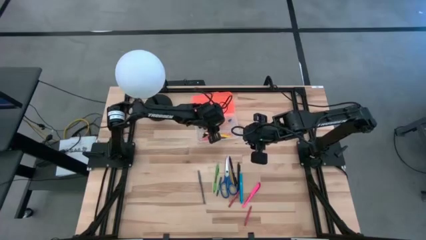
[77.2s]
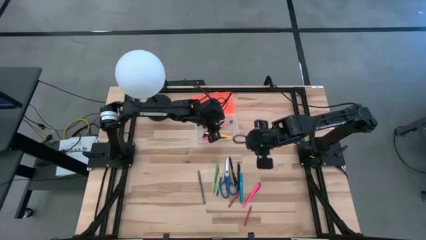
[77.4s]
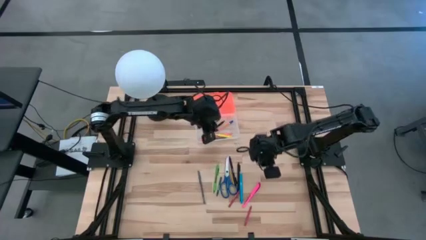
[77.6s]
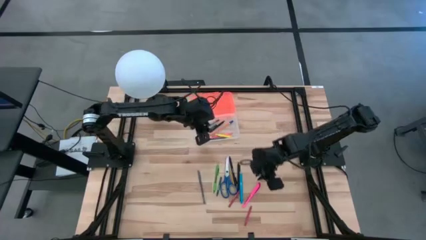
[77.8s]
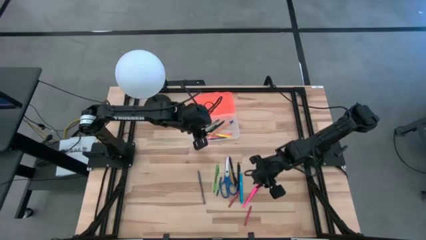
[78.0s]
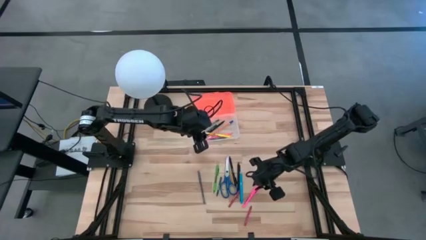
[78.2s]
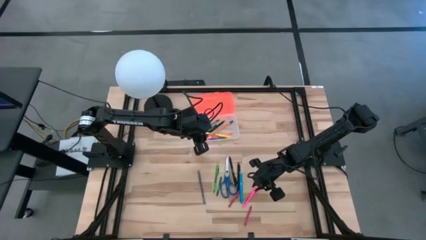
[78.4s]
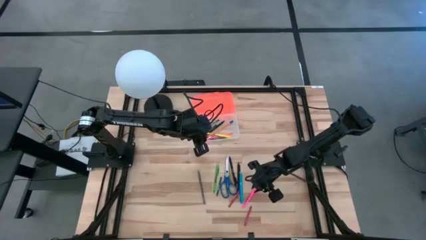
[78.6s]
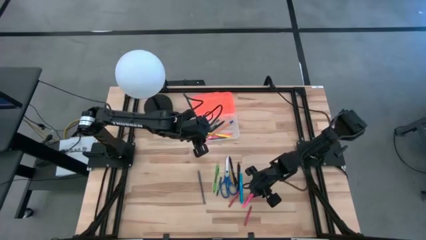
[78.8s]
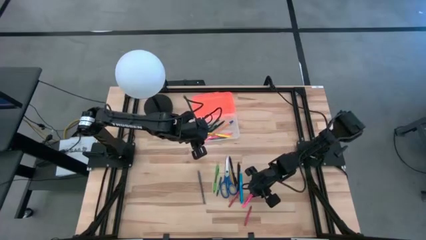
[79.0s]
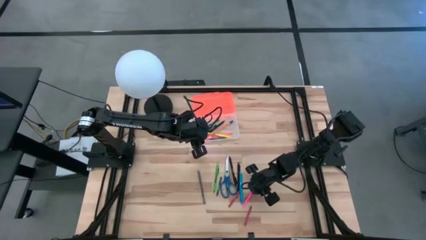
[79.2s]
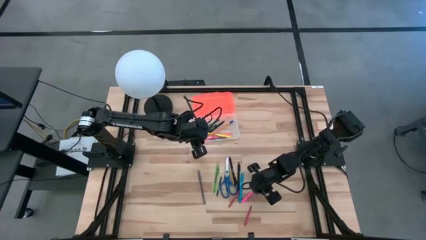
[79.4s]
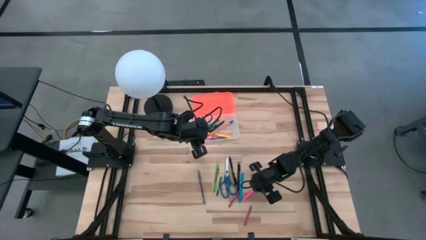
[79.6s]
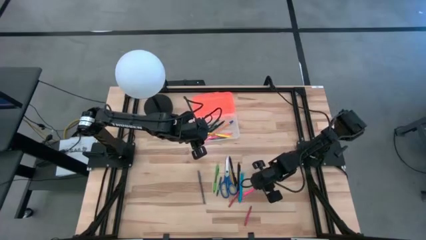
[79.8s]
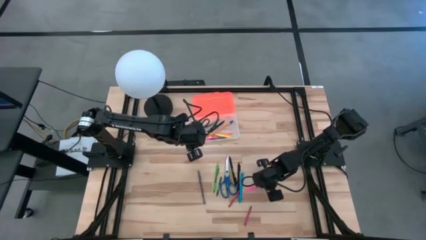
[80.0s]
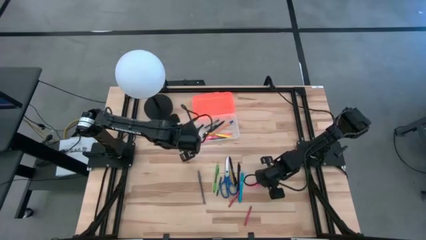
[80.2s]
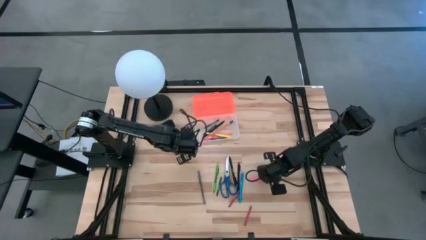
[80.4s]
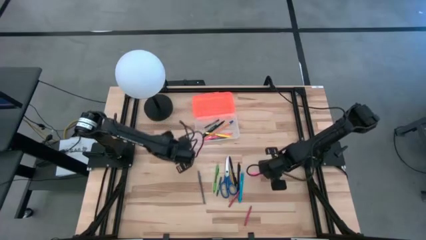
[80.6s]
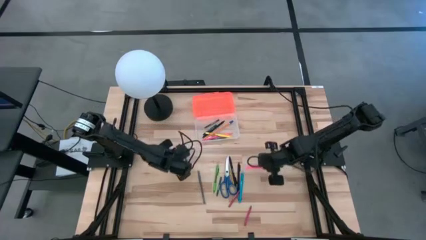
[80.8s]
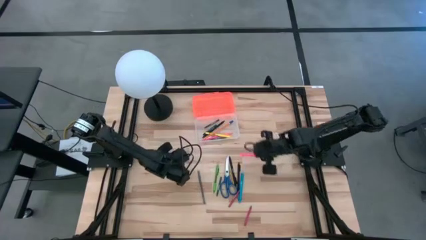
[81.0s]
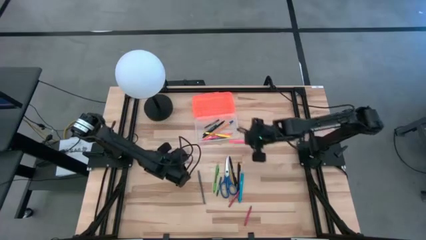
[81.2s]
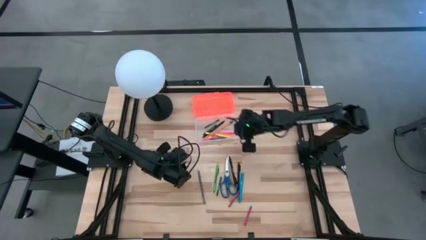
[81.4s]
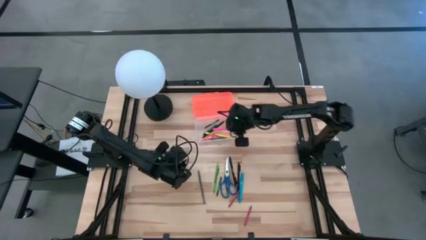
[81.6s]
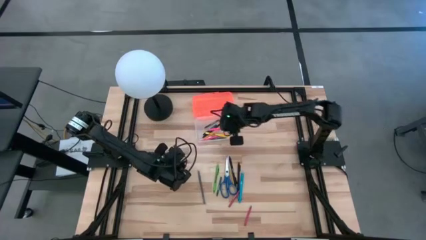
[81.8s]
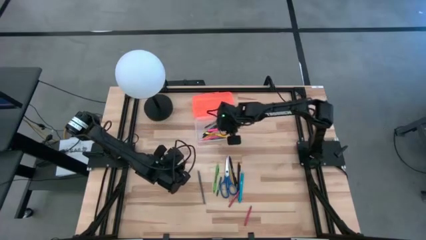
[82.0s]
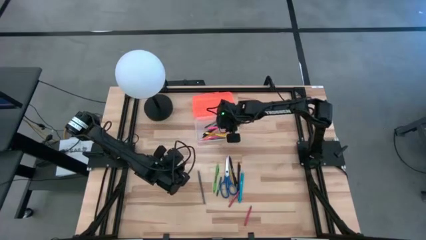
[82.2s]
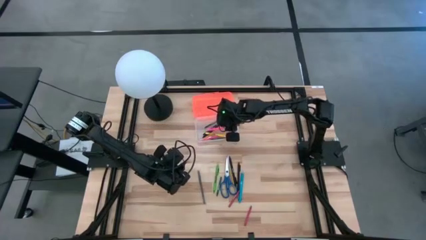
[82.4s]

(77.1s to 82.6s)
Task: Pick & place school supplies into a supply box
Put the pink pen into the supply box

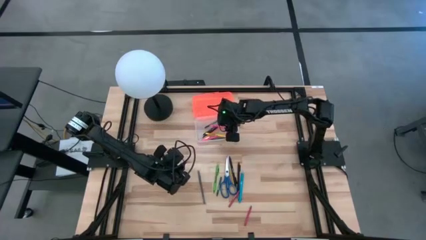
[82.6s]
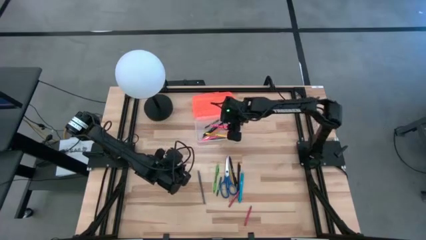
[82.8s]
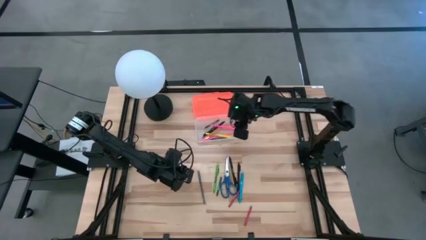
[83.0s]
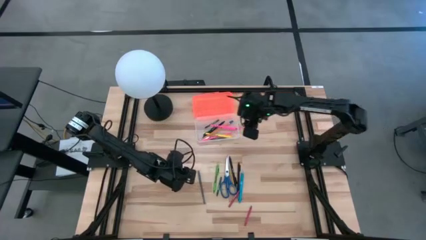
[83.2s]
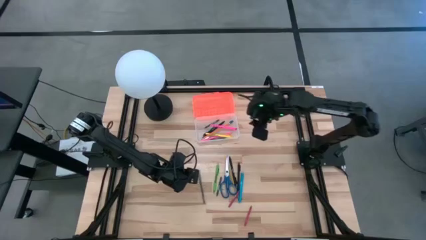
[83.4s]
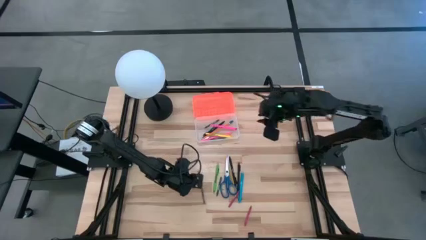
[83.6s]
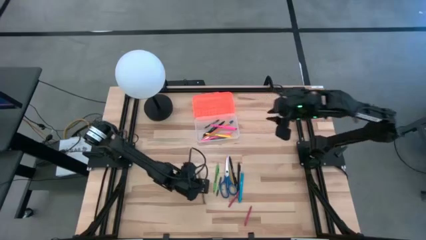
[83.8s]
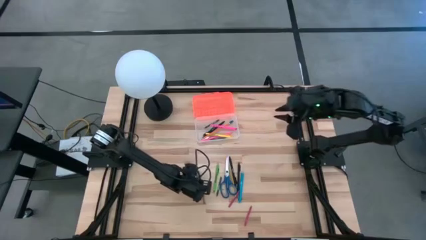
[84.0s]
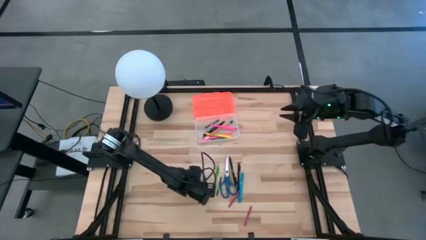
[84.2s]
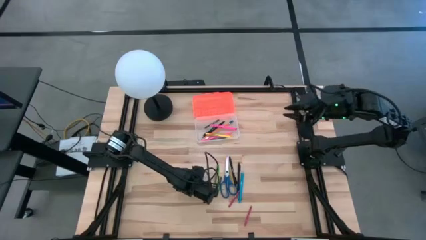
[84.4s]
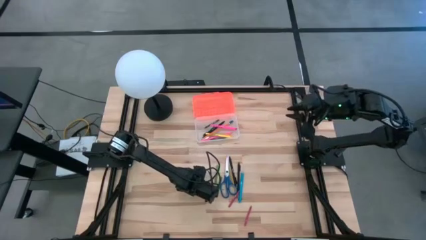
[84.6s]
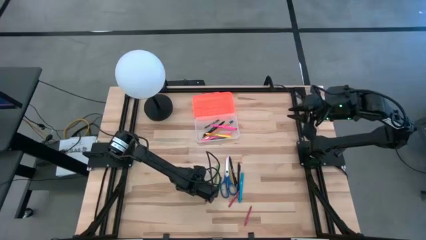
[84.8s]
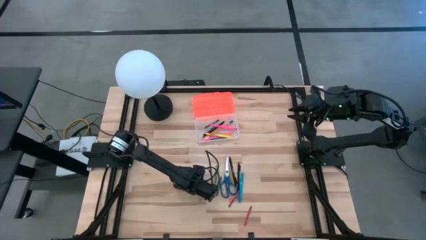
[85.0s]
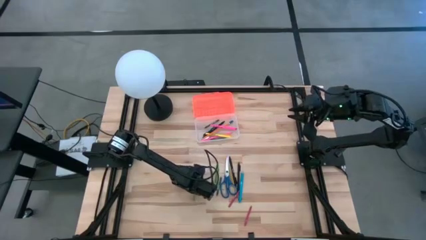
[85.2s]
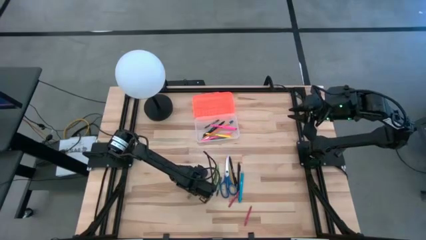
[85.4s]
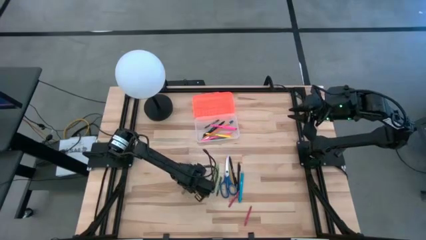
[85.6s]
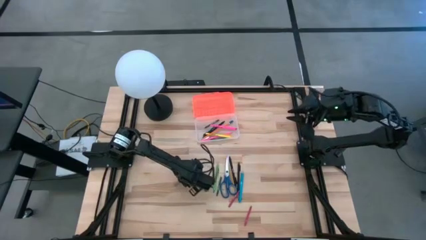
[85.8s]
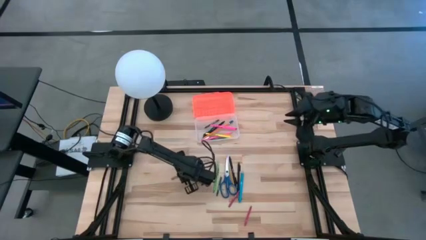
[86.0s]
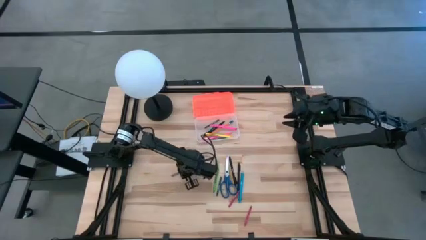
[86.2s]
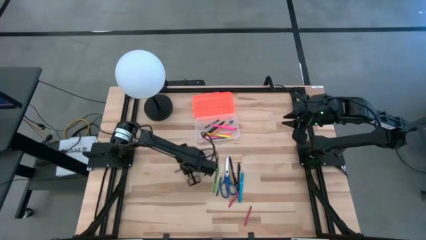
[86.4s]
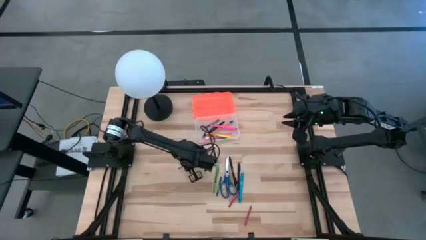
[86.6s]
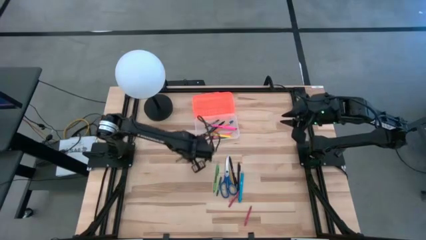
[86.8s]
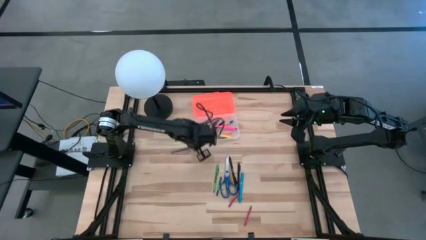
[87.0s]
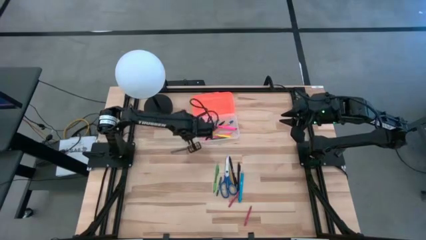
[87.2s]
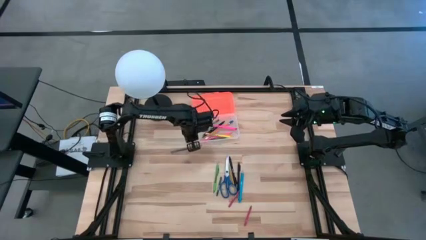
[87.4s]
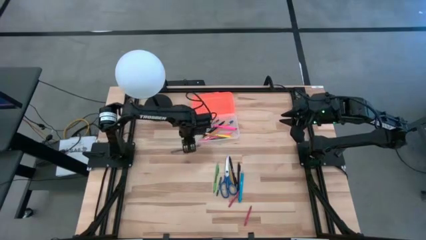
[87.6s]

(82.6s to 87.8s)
Put the gray pen into the supply box

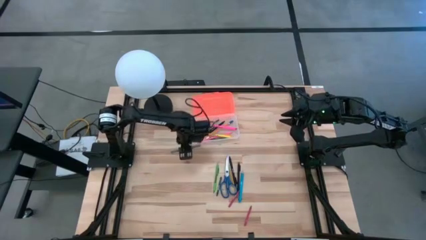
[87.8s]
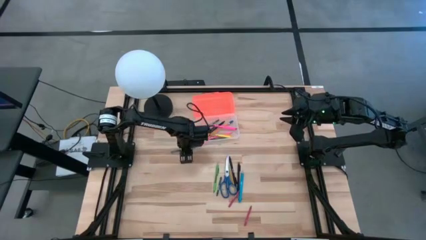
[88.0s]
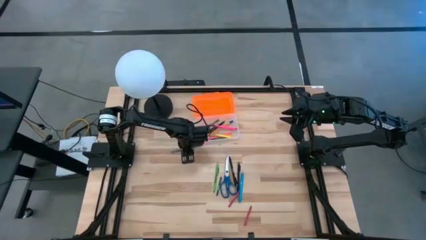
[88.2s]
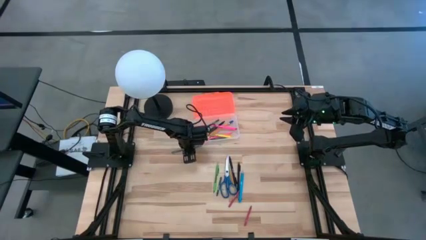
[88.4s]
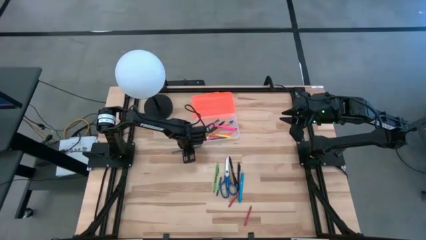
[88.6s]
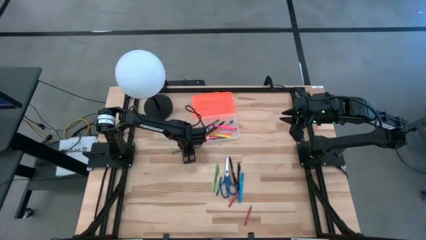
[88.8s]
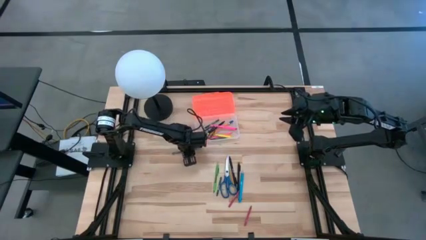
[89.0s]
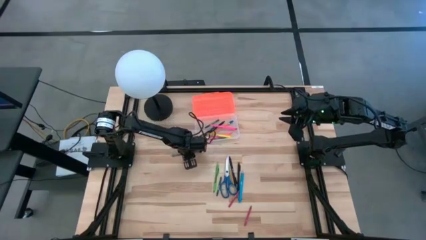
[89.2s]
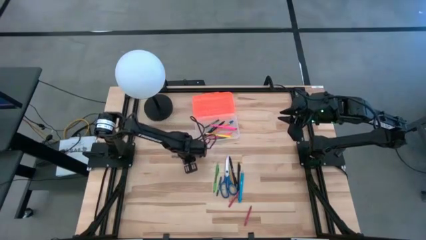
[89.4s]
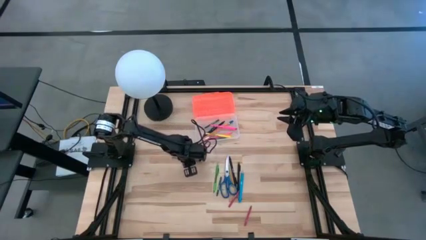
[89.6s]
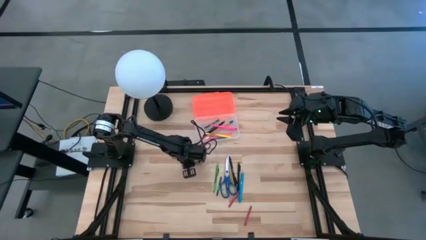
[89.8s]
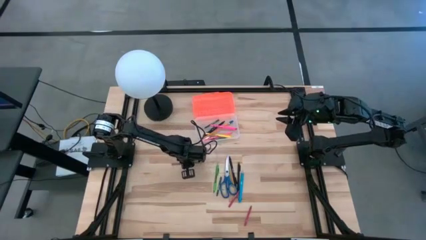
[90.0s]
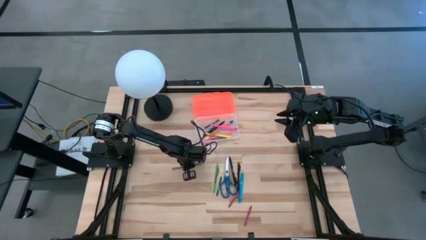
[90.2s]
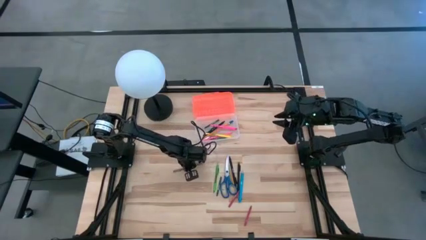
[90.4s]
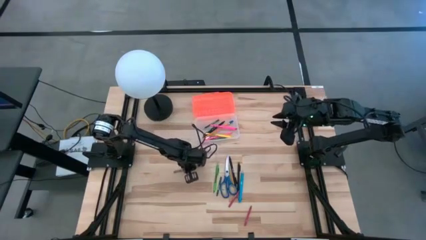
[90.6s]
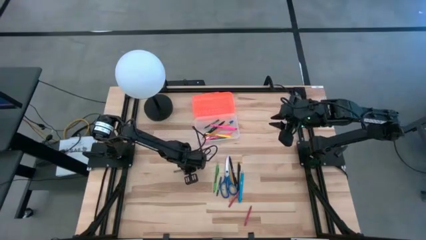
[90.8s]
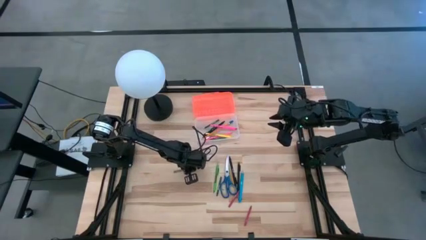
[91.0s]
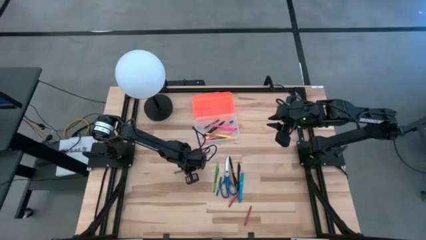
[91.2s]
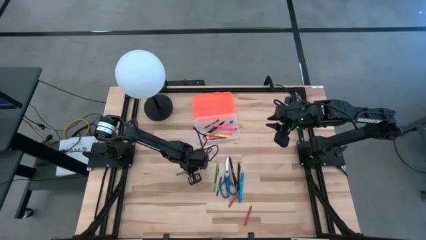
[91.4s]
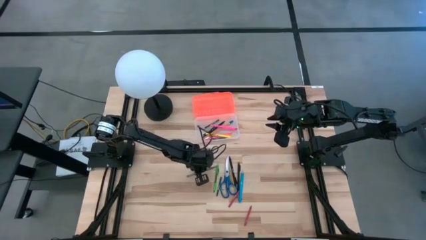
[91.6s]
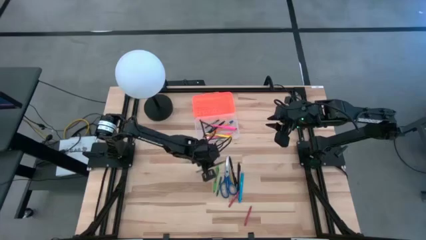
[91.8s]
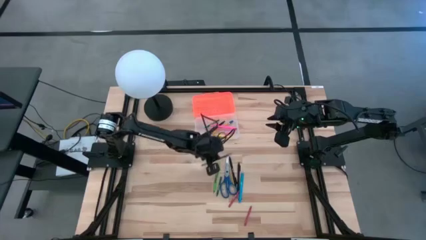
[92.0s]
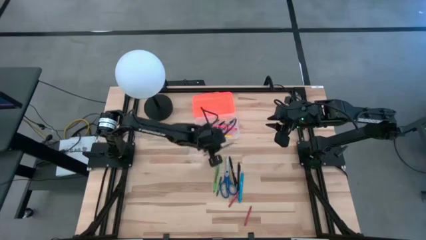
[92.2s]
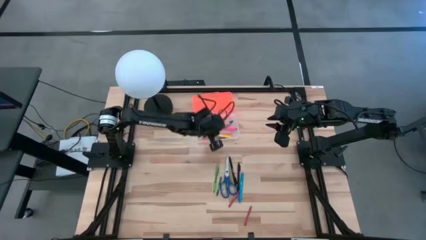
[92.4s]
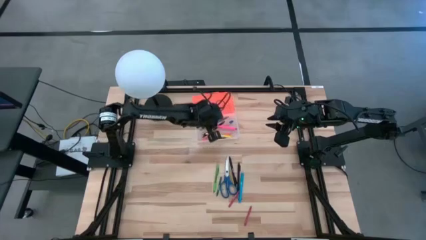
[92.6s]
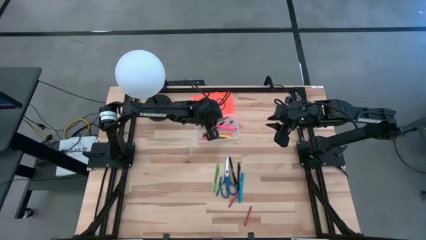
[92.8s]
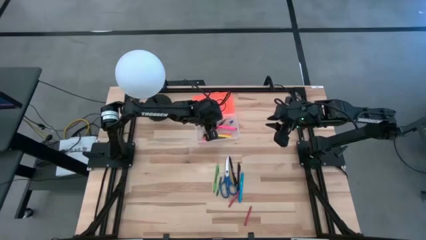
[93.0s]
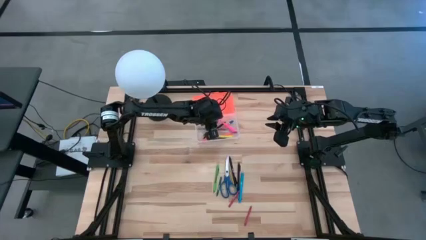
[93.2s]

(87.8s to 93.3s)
Put the gray pen into the supply box
